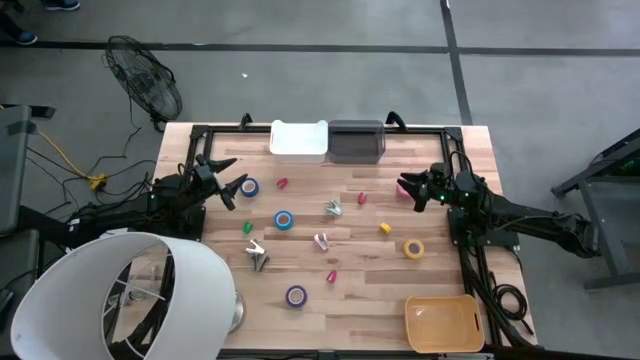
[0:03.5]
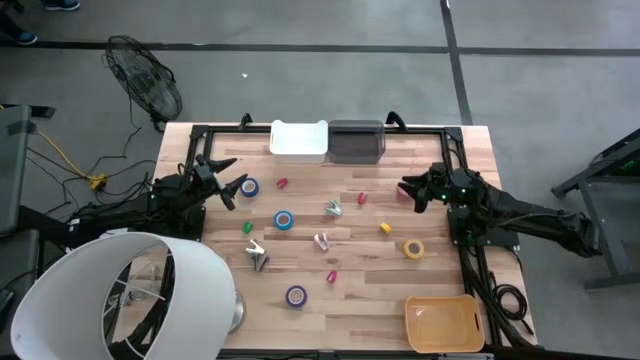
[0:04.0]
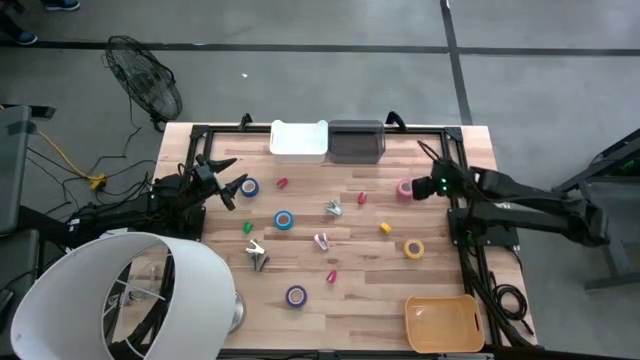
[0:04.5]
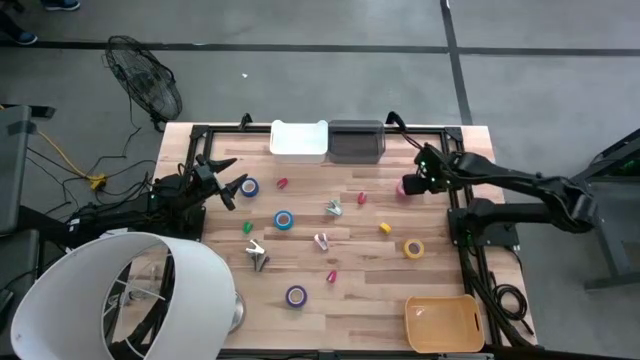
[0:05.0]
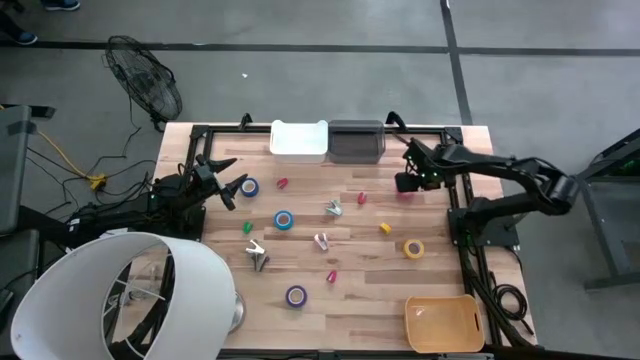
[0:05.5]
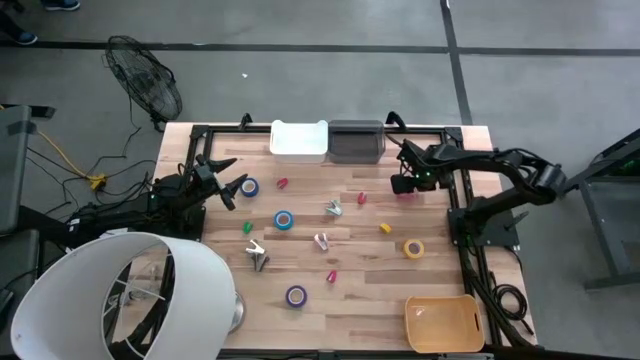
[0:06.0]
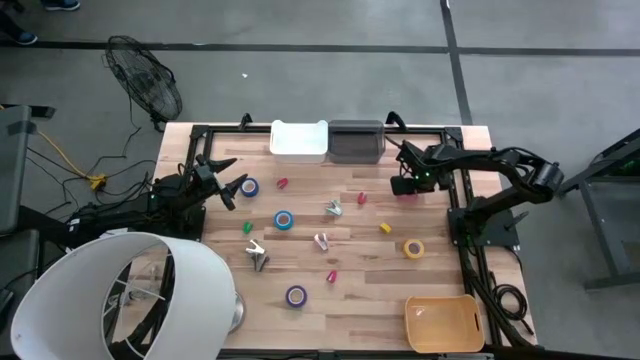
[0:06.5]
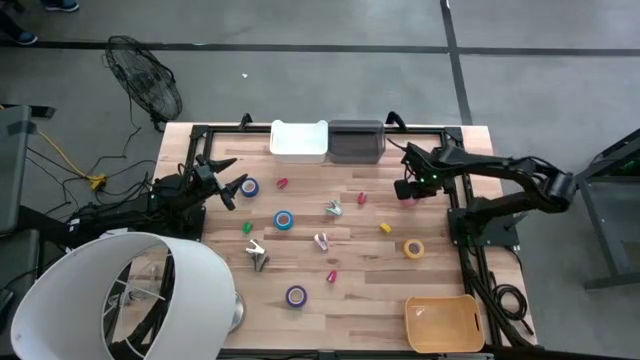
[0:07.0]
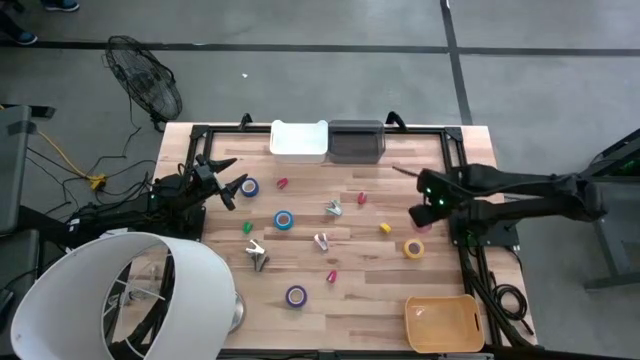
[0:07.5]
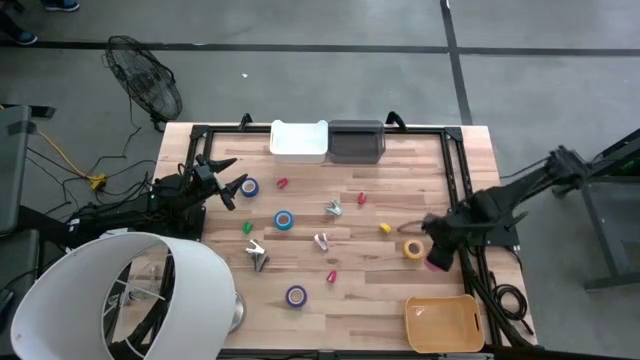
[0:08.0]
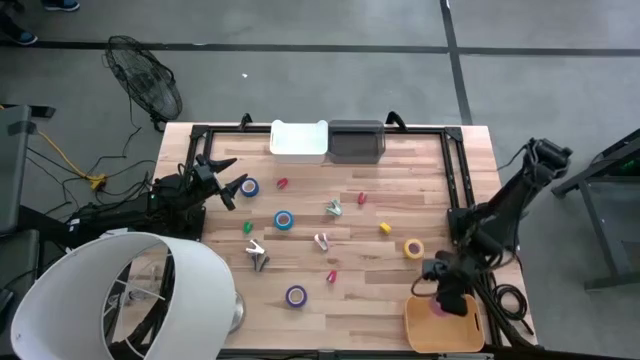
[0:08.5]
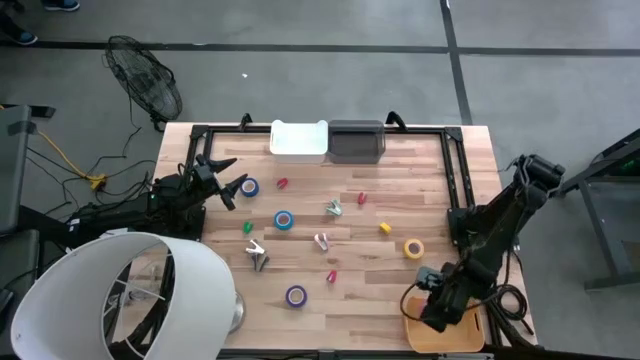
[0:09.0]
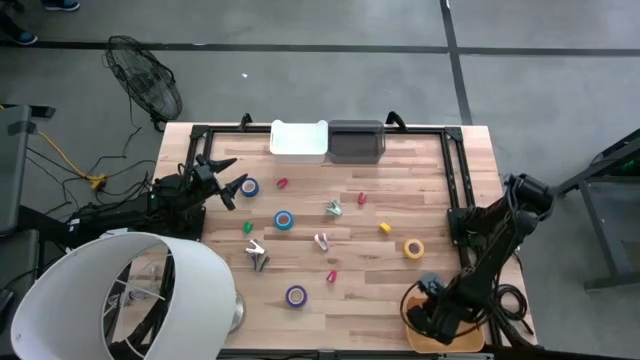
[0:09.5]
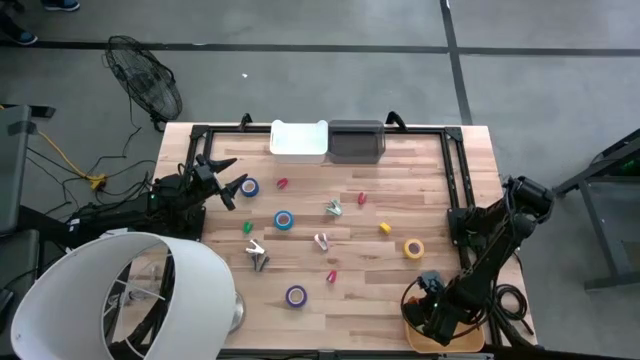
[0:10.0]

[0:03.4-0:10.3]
Task: Pick and place Stapler, Stapler remover, tape
Put the pink tape into the yellow bin

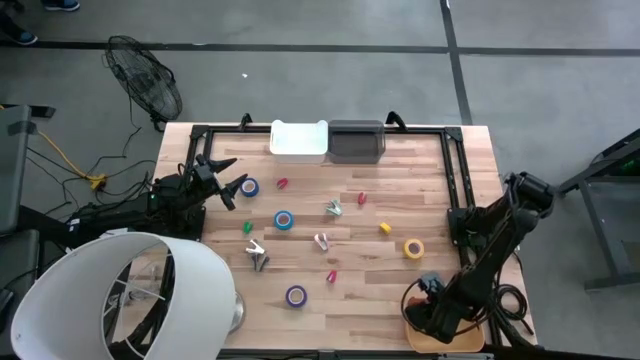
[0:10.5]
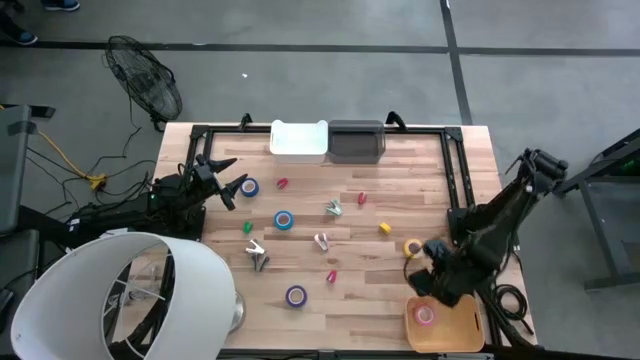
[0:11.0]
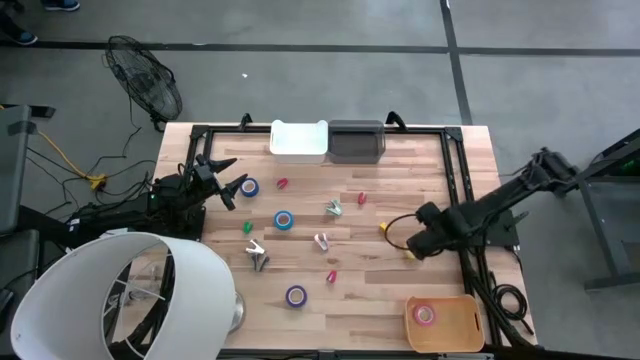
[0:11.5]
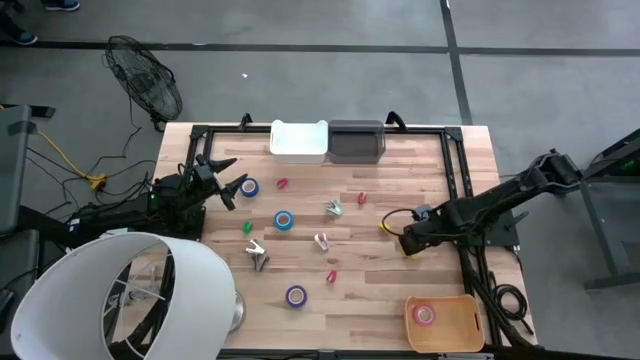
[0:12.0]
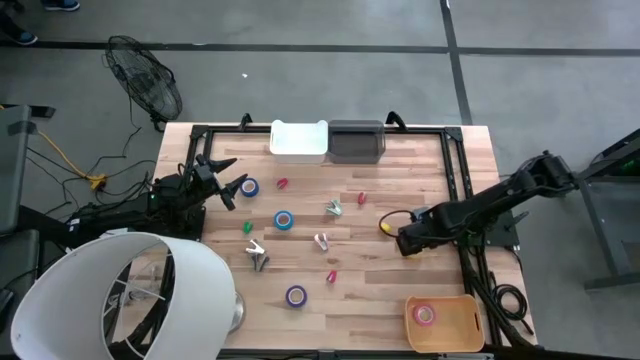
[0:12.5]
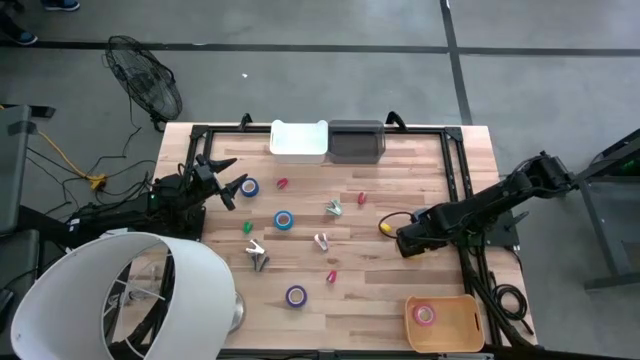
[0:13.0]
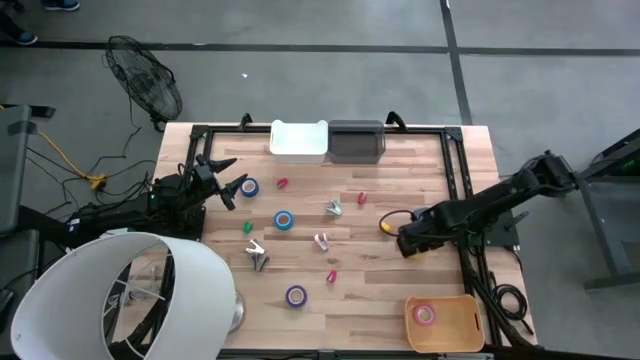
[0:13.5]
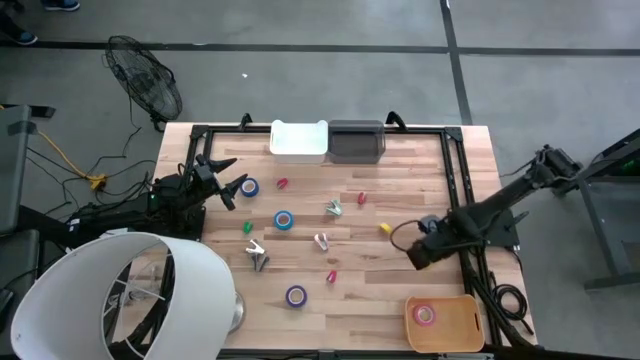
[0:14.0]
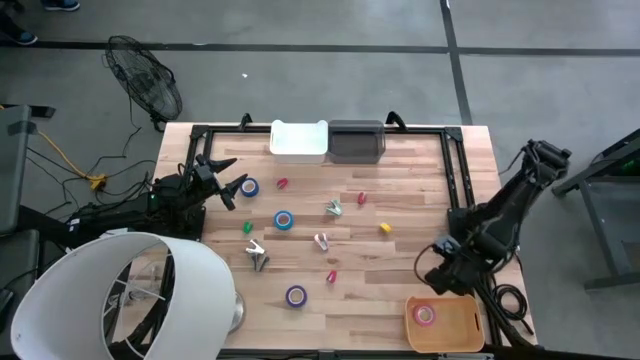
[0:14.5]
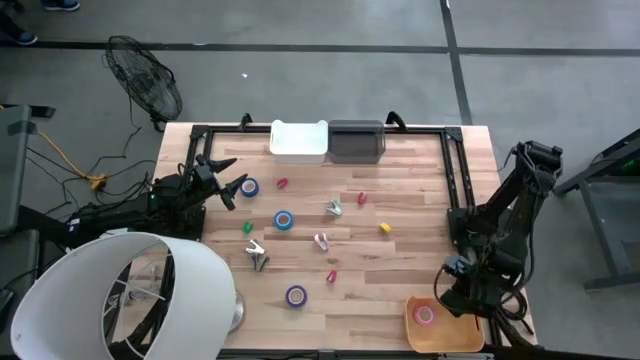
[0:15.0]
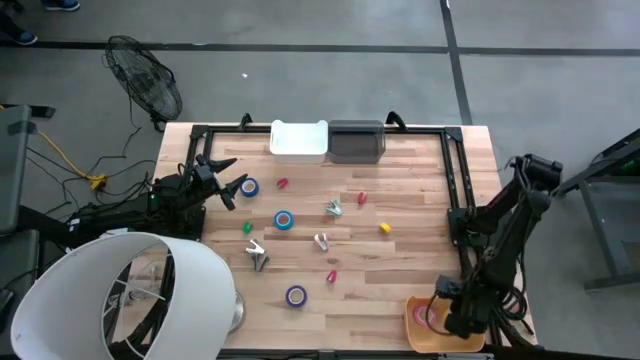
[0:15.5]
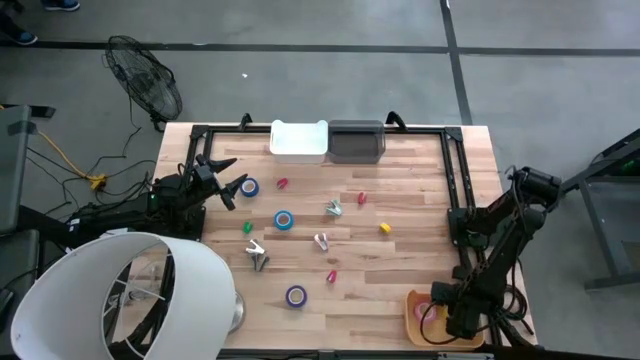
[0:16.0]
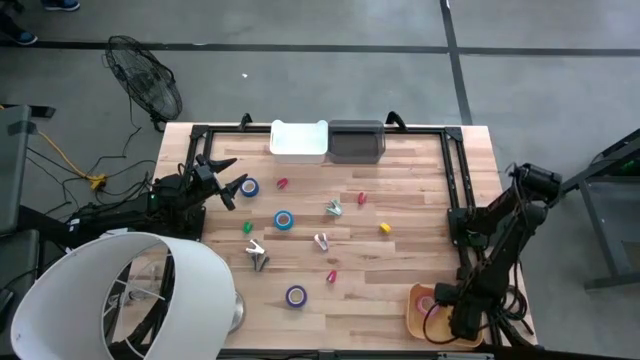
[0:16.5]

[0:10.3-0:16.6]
Put the yellow tape into the yellow bin

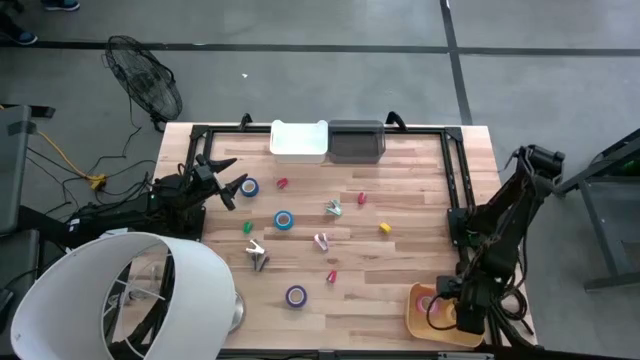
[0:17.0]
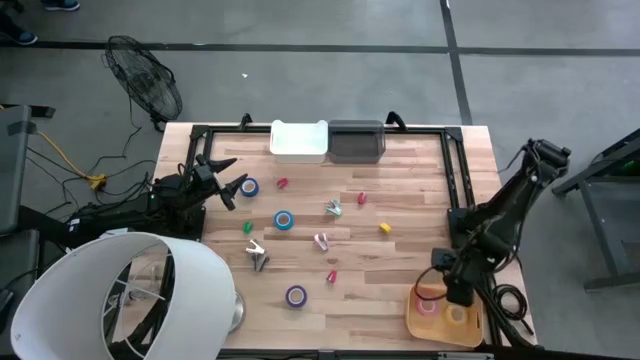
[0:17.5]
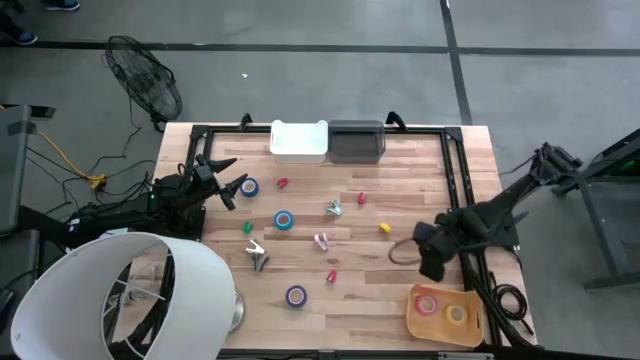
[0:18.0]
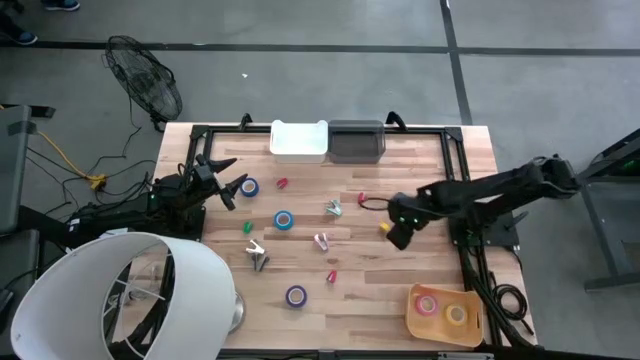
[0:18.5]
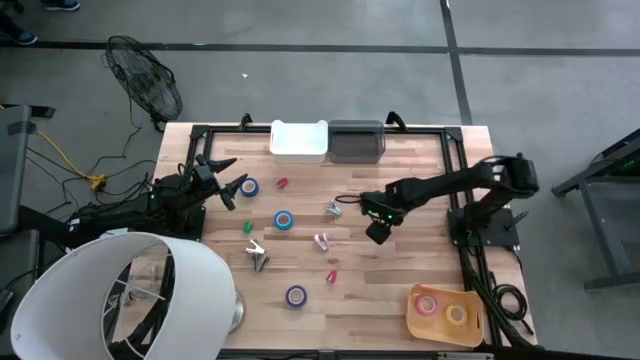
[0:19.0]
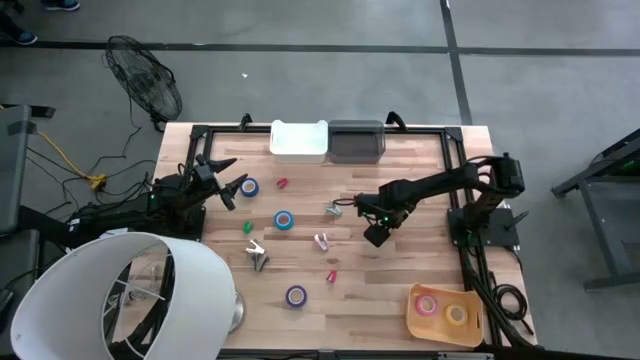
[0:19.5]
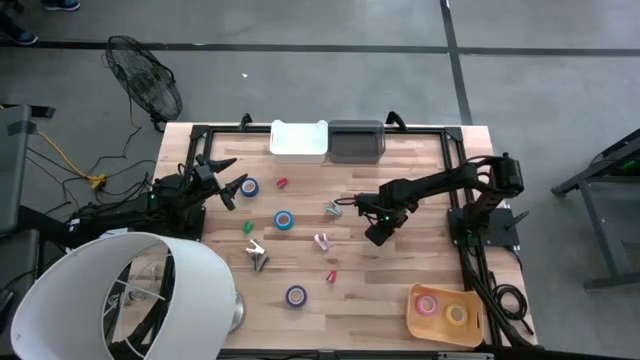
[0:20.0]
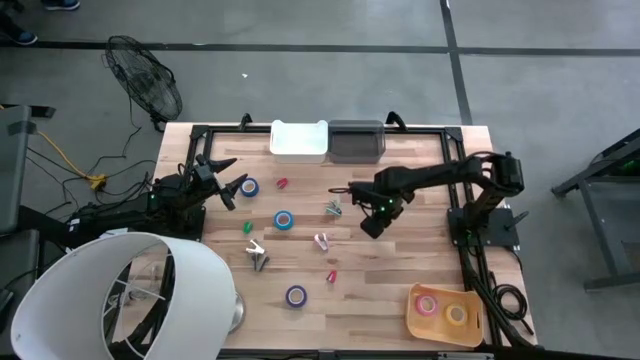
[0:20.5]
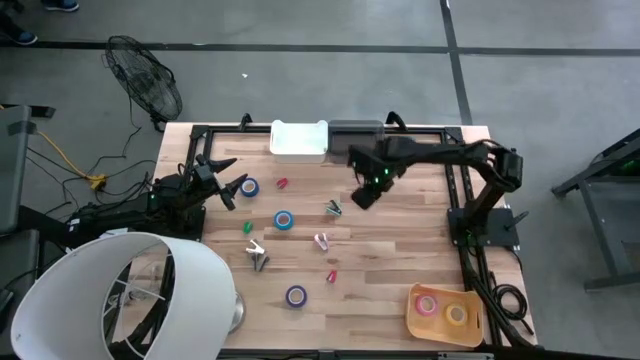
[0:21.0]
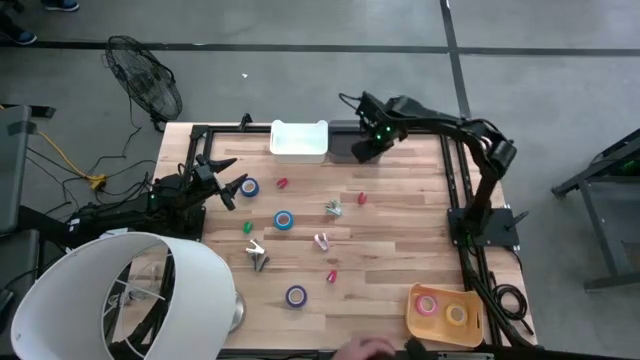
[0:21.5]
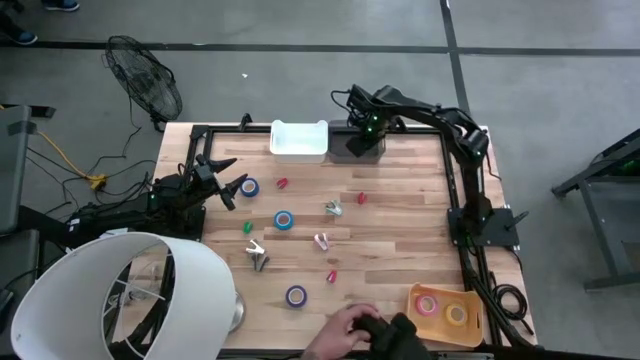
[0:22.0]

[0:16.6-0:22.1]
Put the yellow stapler into the black bin

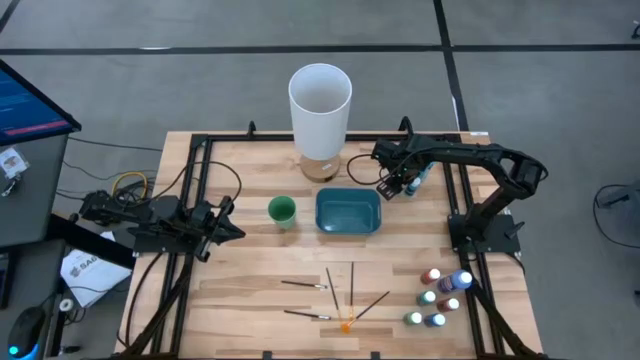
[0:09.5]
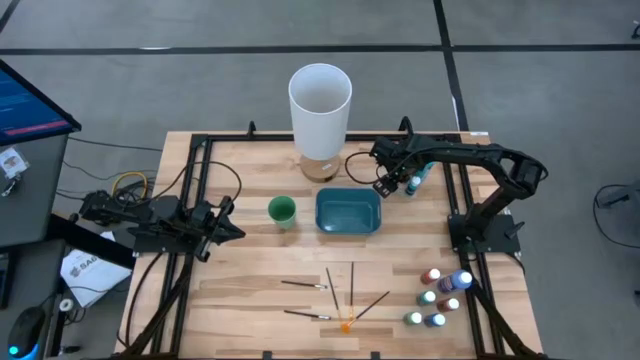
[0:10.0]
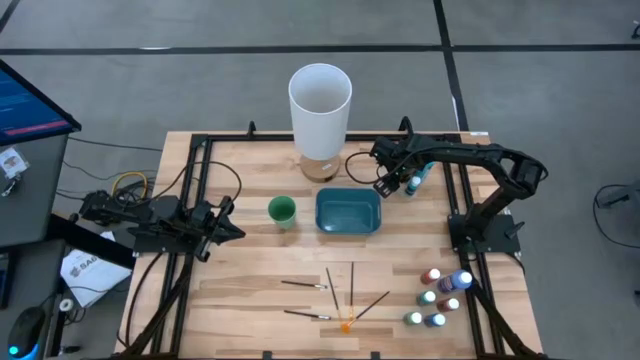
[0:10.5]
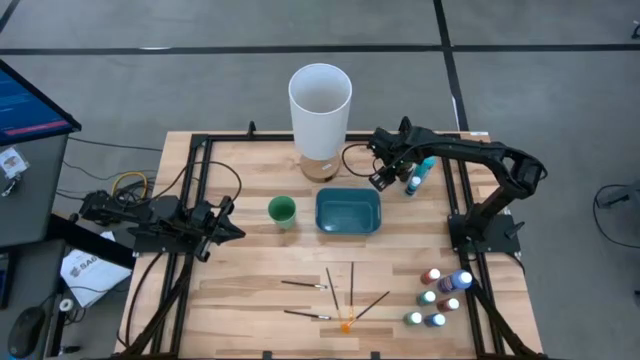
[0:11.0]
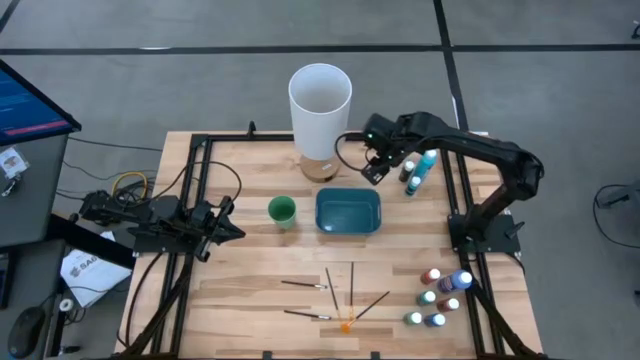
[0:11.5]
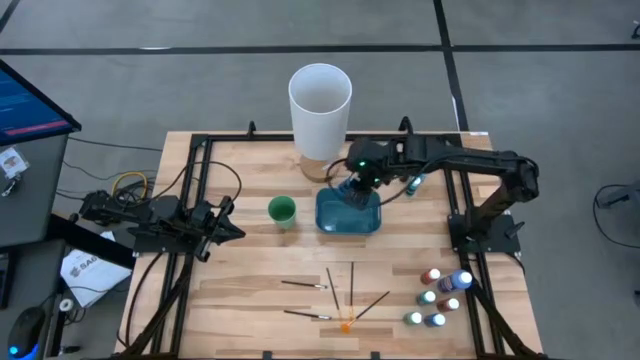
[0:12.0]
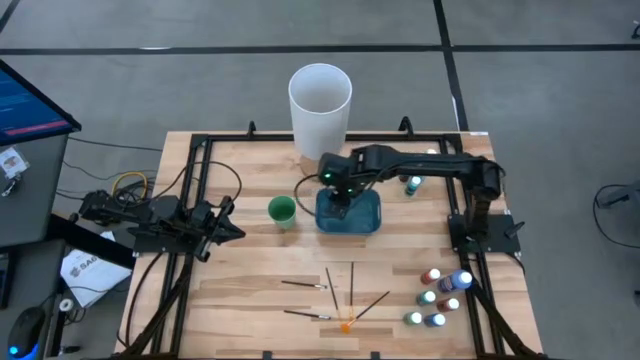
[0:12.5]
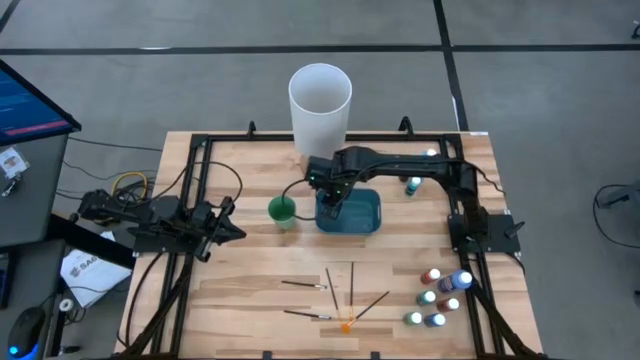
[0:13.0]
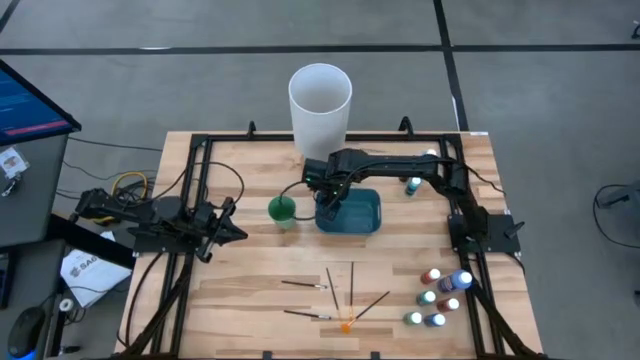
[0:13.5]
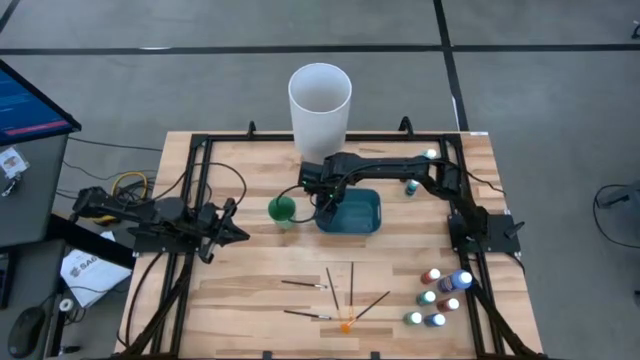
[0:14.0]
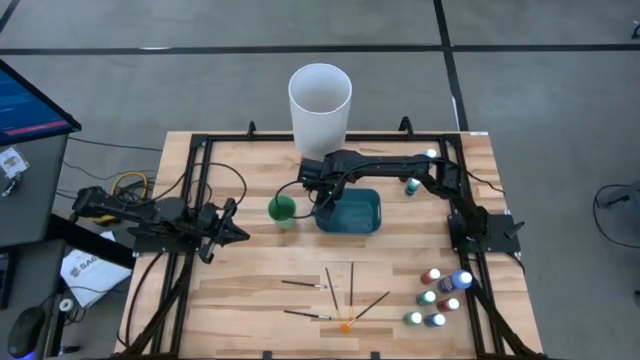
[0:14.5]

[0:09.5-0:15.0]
Task: Pick & Place Paint Supplies
Put the top small blue paint bottle into the green bin
